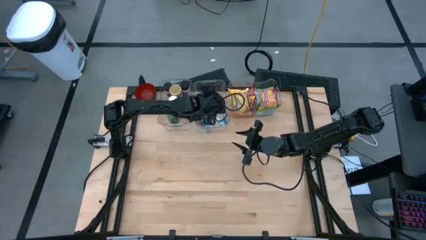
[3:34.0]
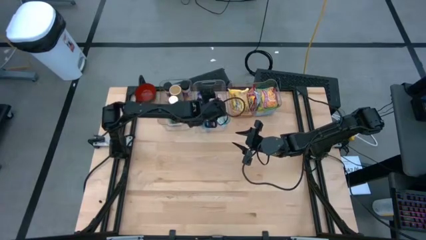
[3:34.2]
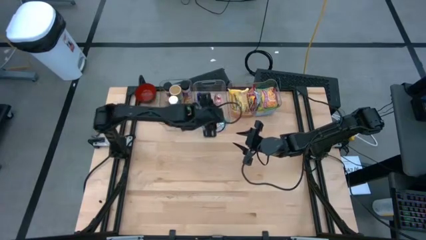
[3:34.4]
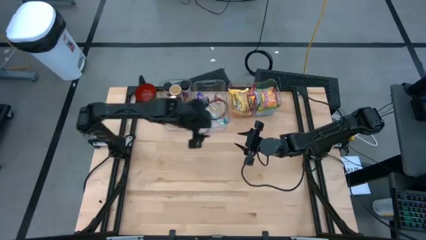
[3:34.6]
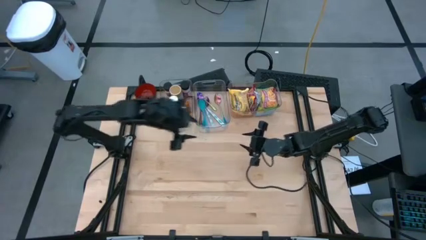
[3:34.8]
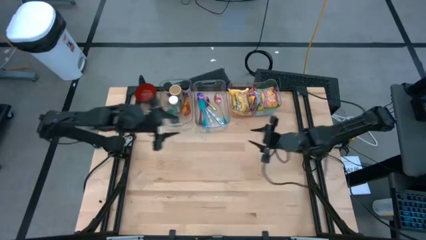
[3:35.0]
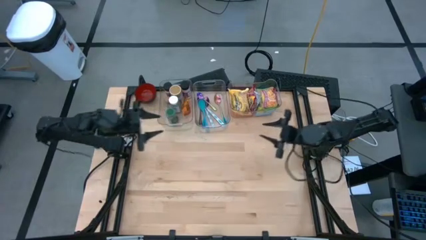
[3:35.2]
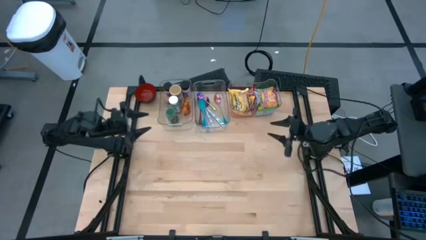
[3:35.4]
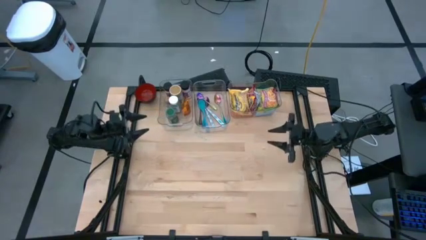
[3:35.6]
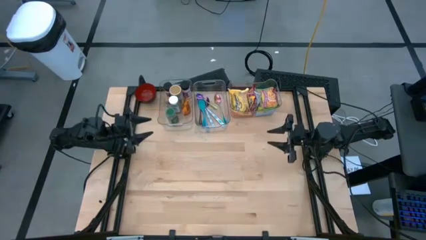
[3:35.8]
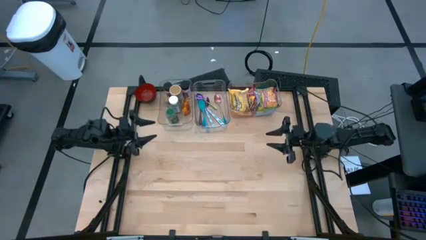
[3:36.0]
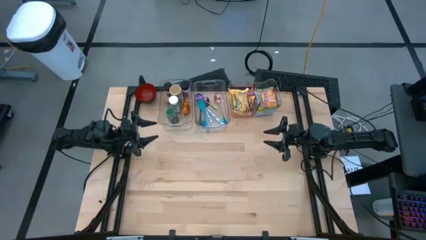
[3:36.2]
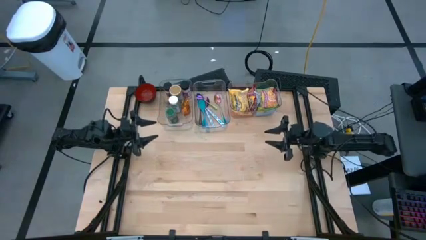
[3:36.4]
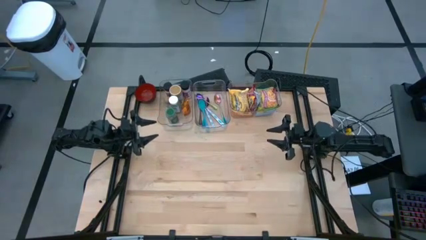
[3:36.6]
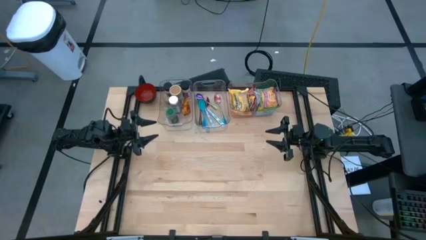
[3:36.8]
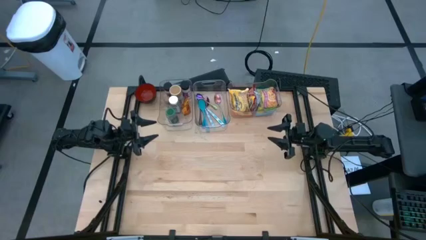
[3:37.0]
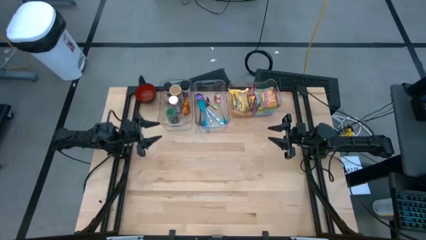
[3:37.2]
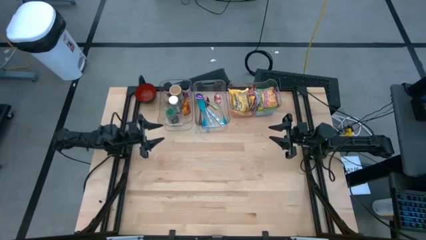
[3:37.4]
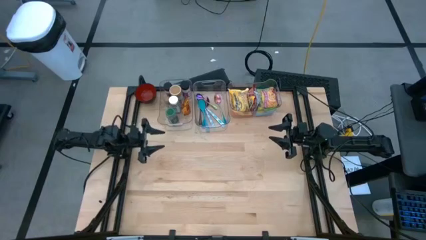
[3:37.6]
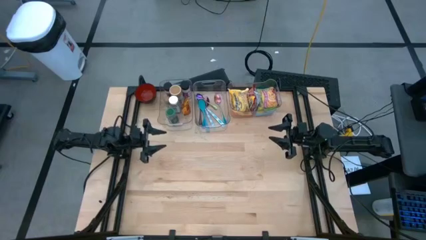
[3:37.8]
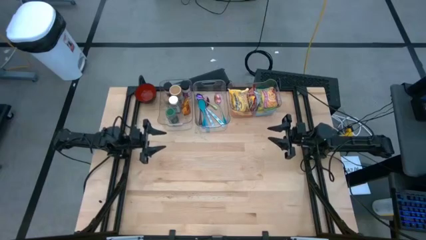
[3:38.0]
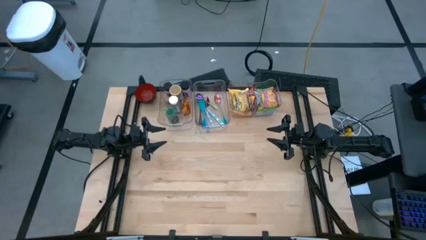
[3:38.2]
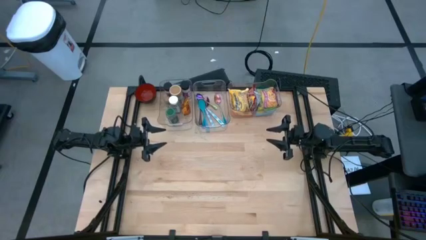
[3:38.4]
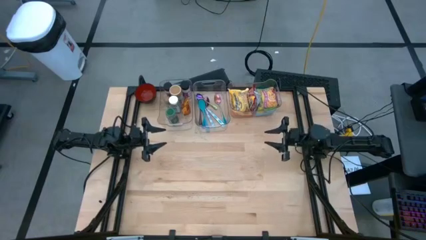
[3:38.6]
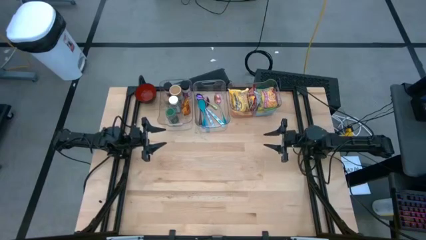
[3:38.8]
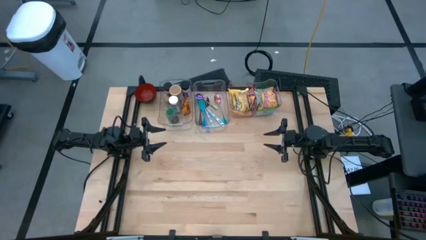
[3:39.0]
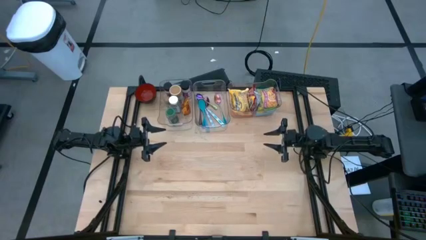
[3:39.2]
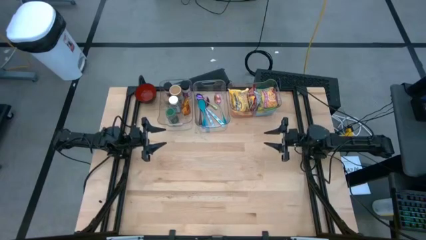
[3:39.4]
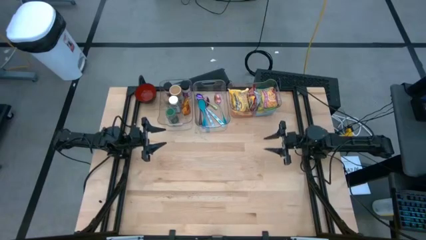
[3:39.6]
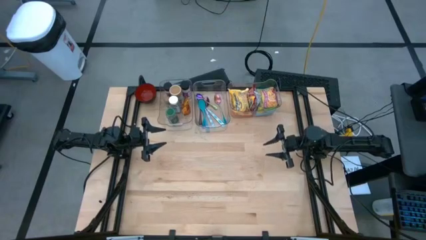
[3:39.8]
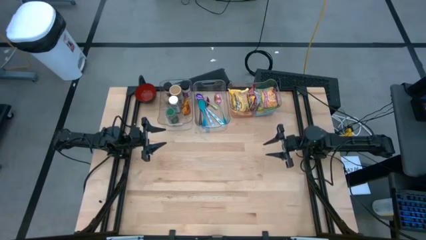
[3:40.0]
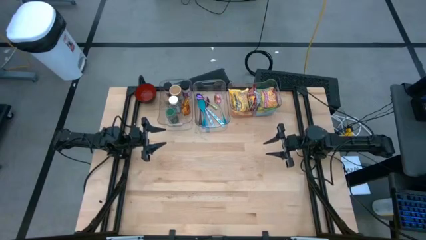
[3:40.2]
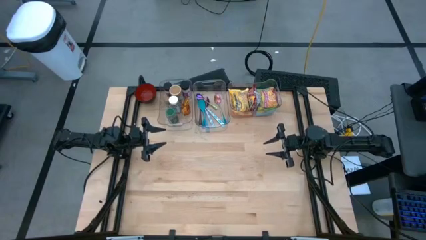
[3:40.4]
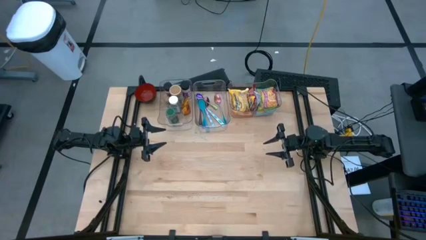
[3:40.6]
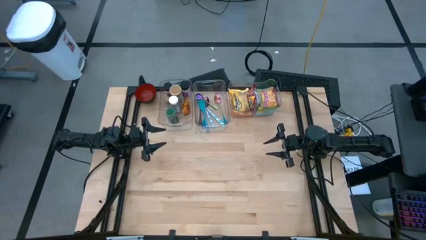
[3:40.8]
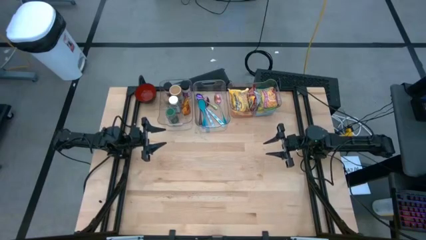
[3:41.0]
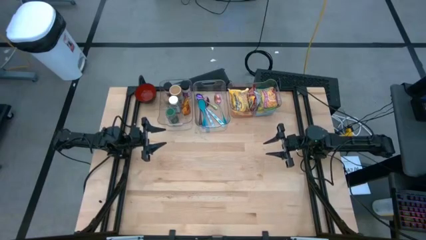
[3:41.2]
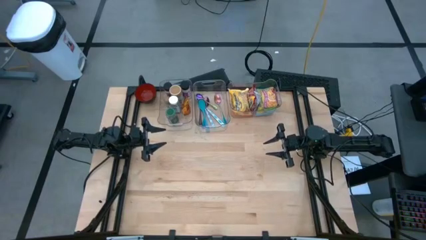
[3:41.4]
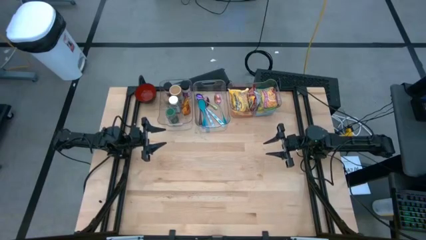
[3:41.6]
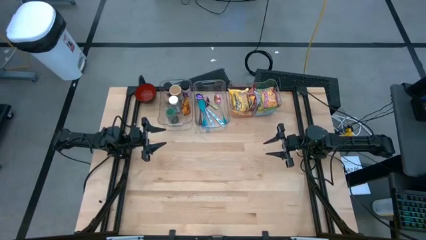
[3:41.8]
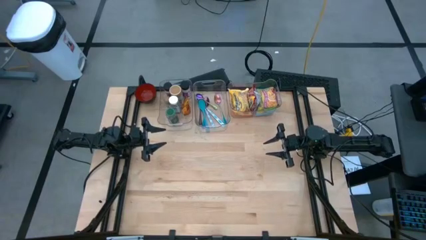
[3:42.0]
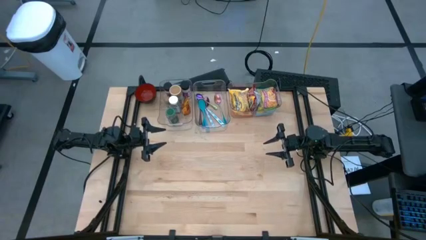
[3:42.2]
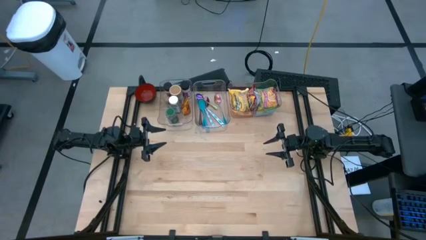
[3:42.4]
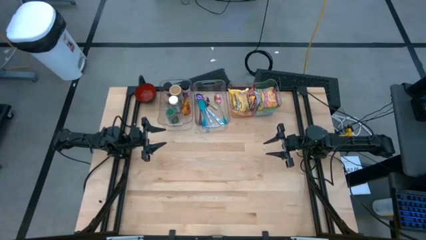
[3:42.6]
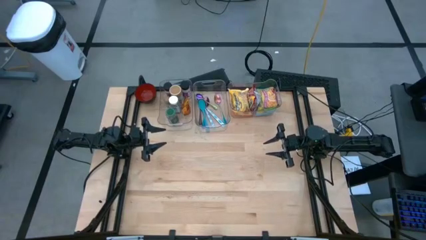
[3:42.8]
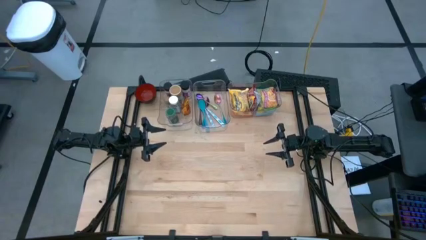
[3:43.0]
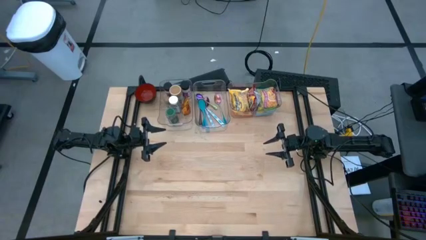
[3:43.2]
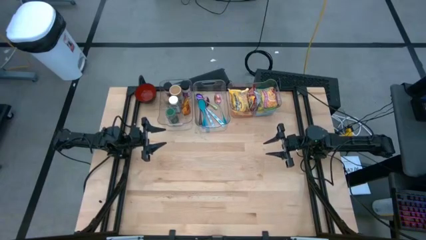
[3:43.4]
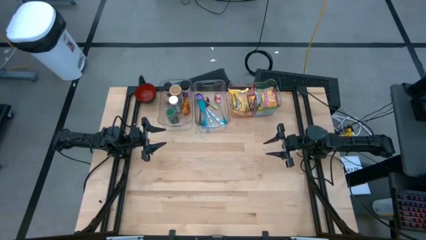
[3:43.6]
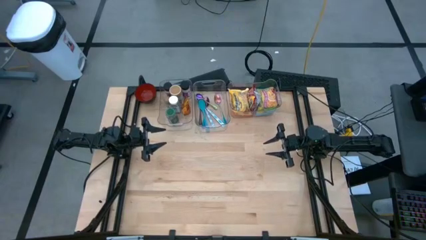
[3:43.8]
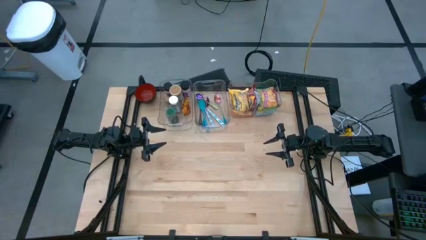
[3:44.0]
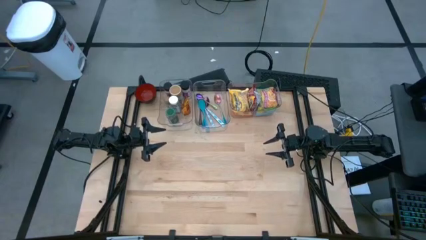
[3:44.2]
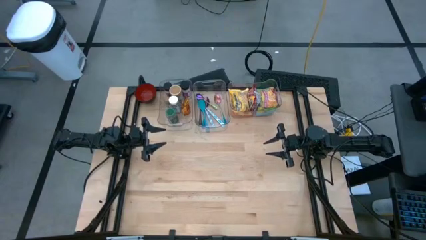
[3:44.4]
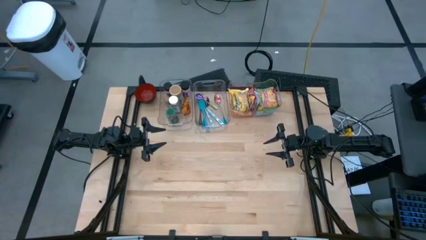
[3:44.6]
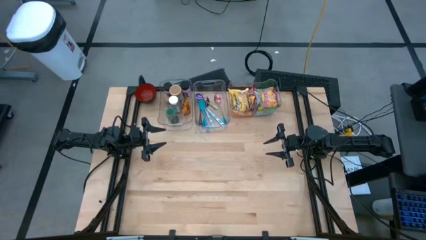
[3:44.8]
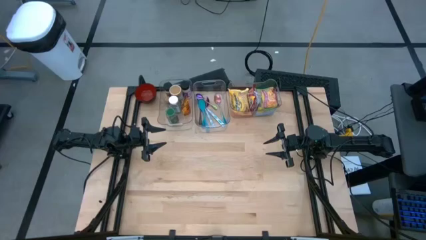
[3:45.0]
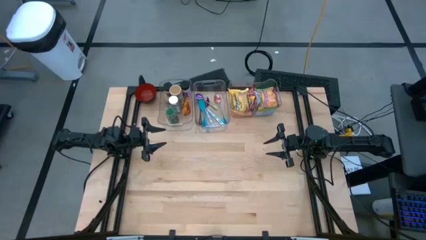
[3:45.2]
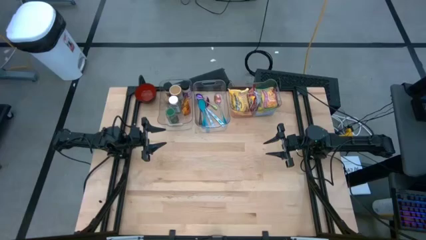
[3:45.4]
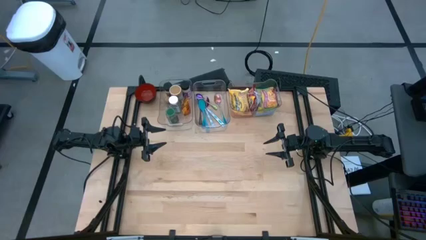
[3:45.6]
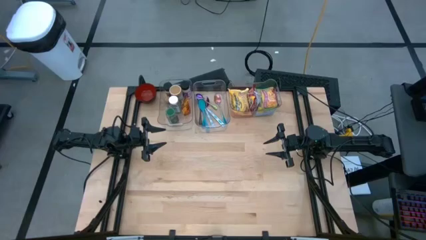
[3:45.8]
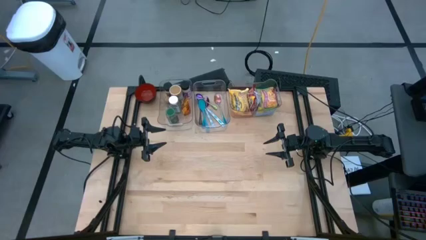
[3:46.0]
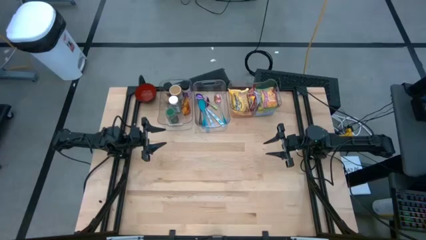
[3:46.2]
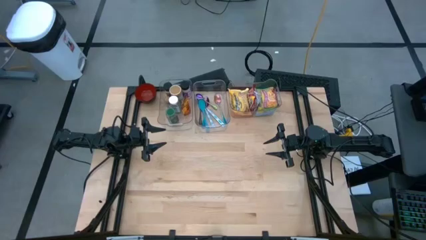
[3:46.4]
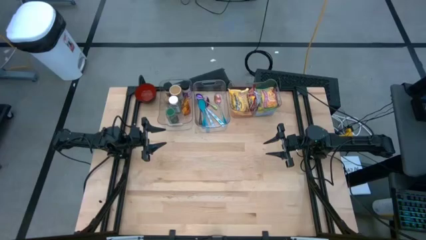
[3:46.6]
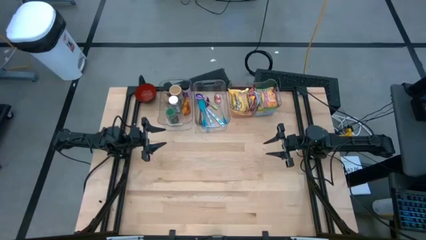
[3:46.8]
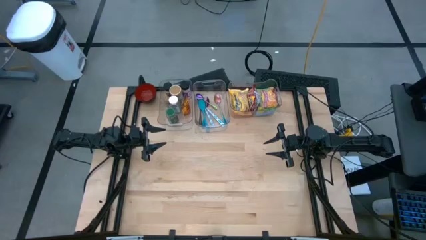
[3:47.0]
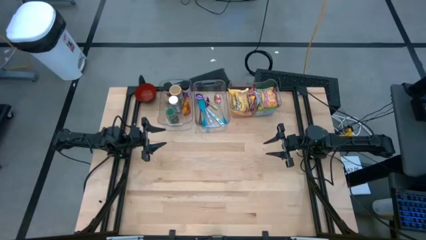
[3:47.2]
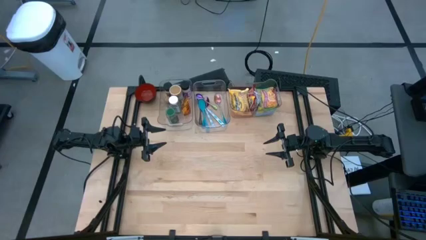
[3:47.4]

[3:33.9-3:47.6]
Task: Pick & Place Food Item
Return to Home Position

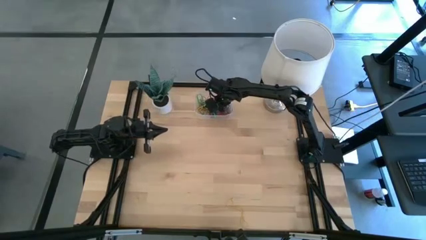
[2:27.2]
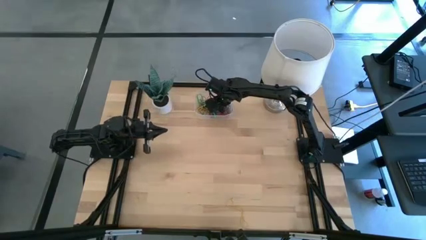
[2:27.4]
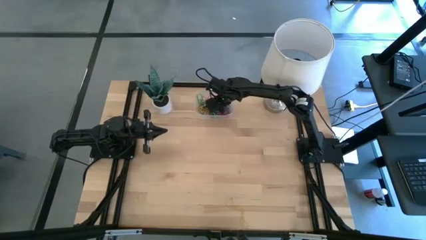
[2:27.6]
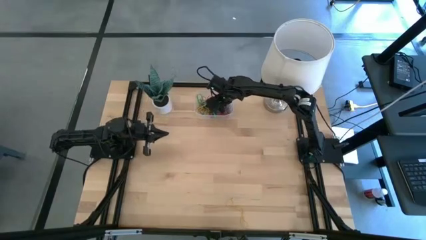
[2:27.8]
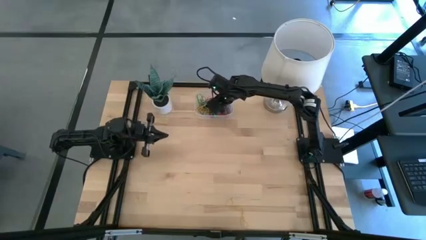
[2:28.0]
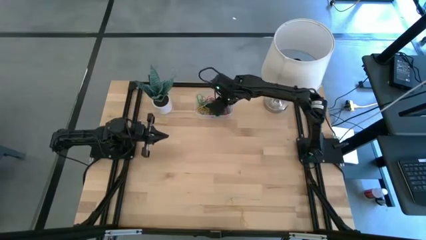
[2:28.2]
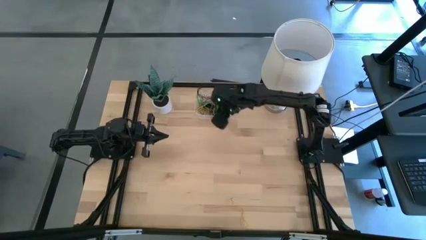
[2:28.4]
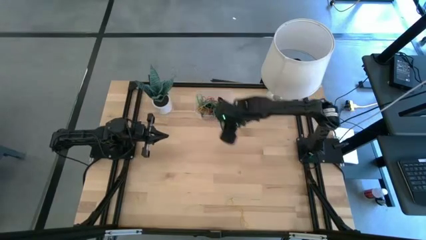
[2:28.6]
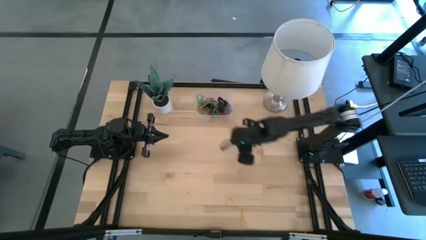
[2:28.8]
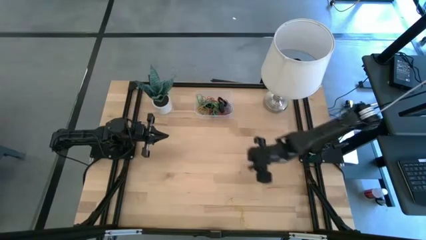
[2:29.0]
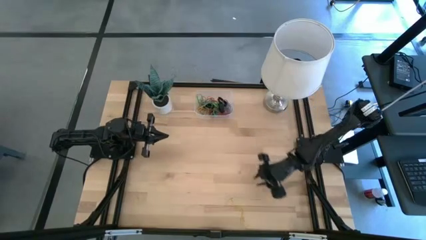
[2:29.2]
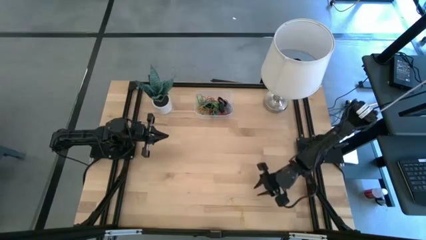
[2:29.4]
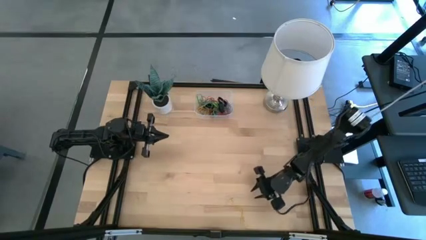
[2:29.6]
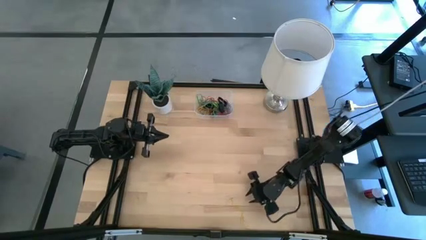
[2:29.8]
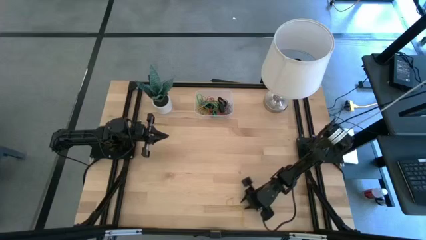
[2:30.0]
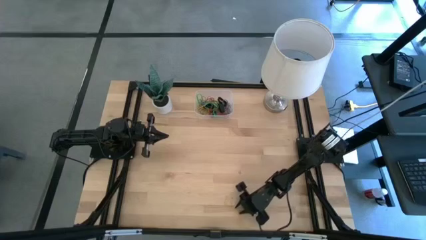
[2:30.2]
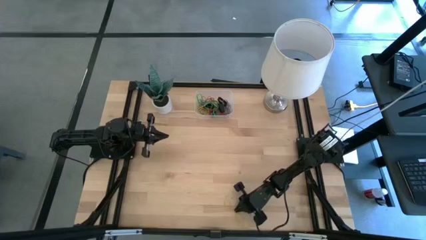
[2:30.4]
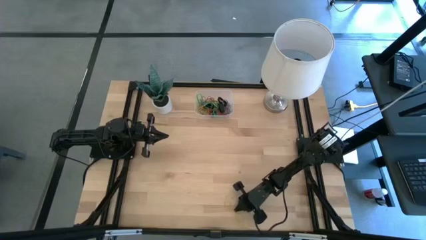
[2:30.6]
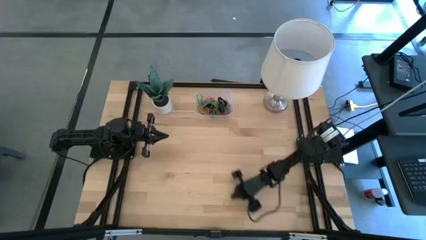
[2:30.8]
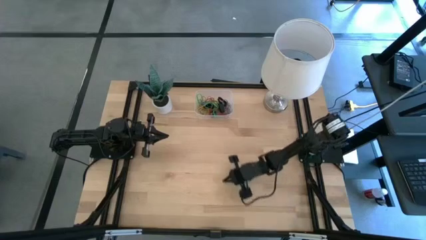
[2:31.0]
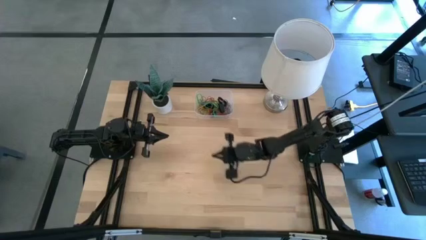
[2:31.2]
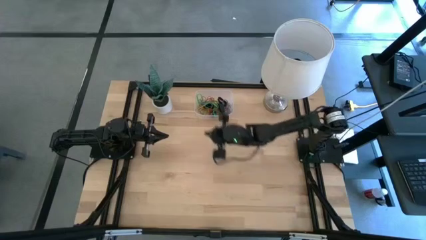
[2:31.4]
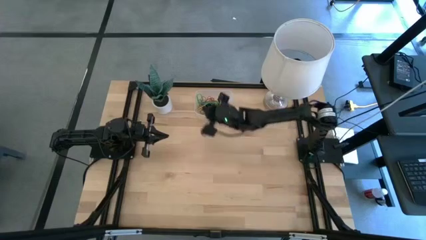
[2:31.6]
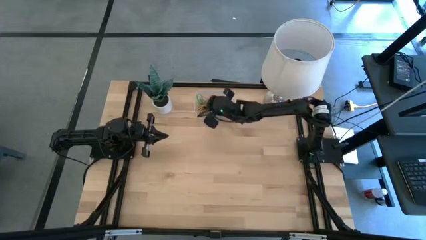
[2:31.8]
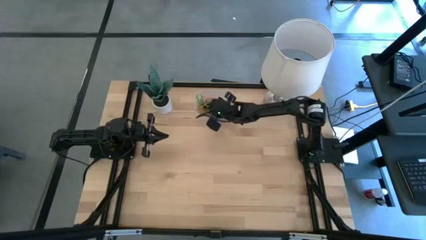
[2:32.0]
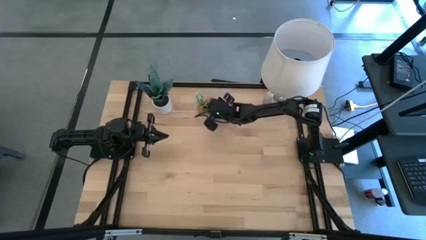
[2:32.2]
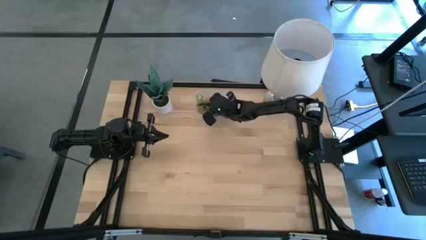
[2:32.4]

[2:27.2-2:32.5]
Task: Pick and place rubber bands into bin
Put the yellow rubber band into the transparent bin
